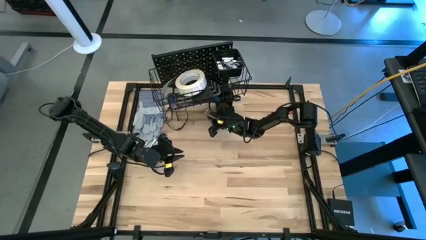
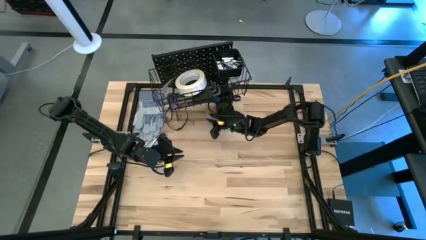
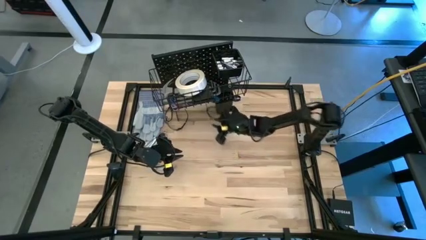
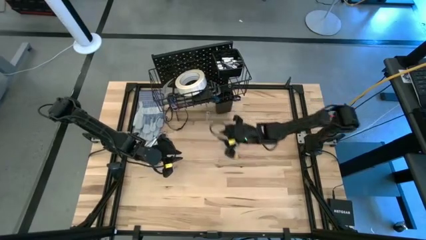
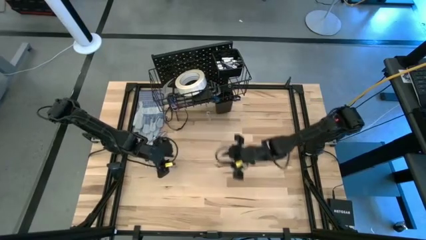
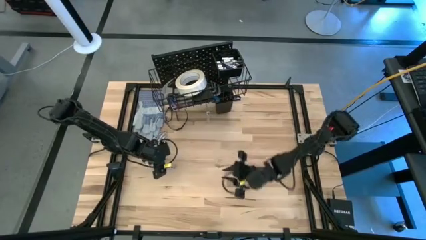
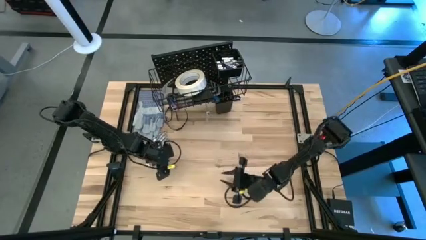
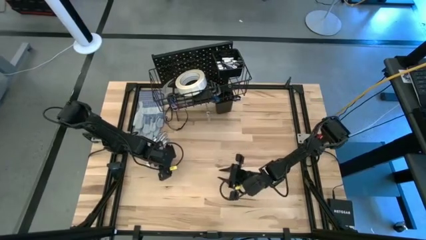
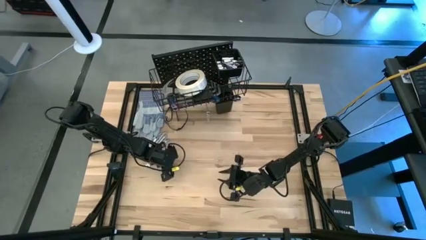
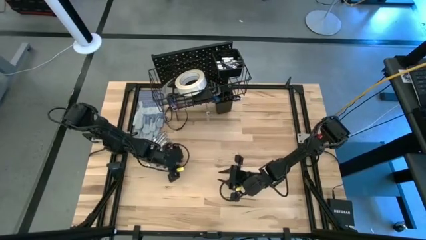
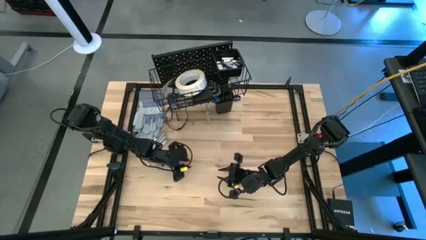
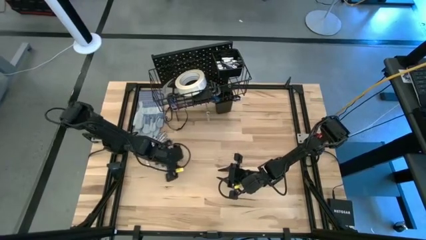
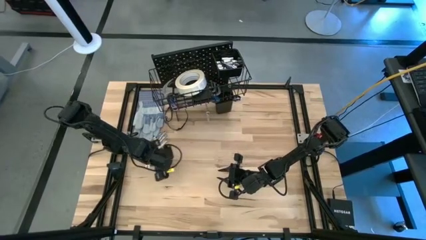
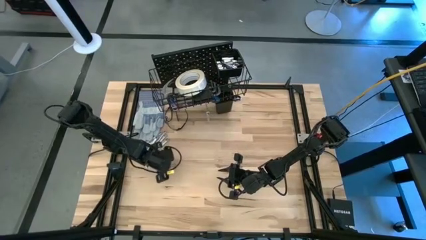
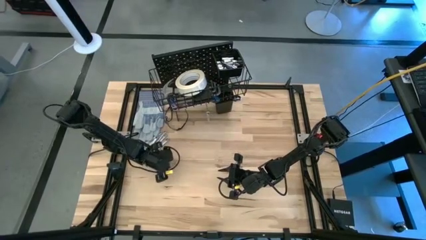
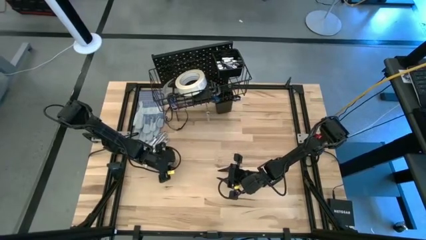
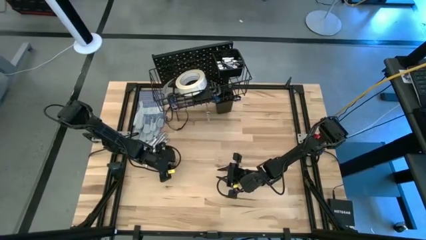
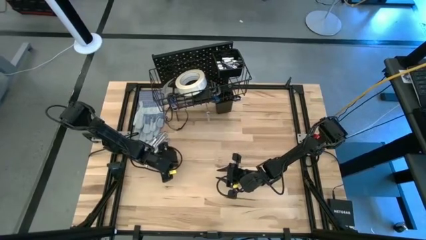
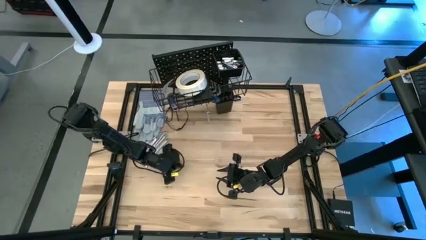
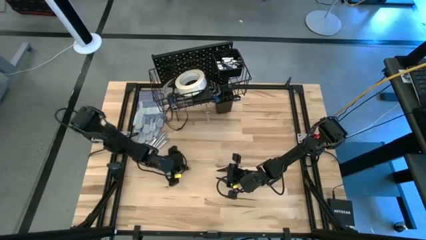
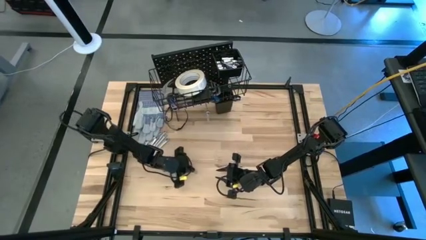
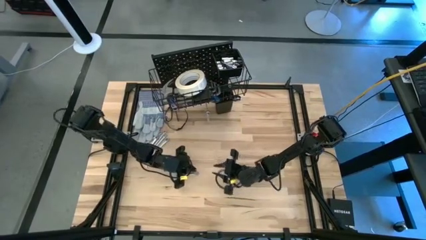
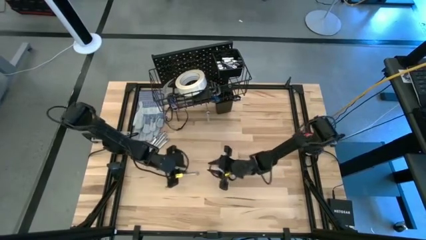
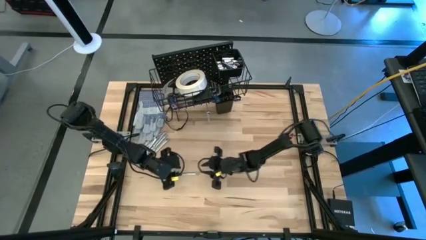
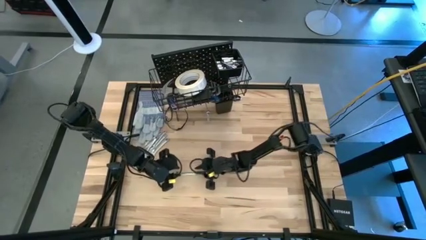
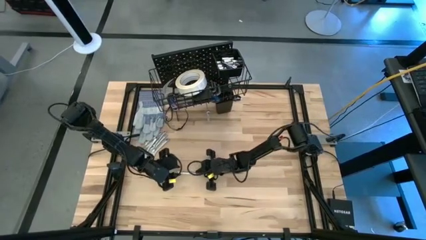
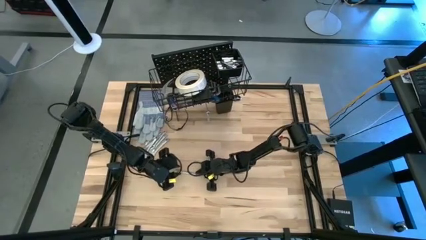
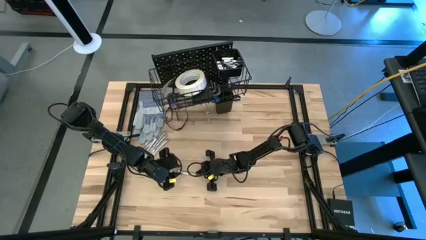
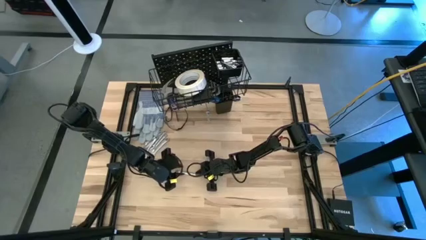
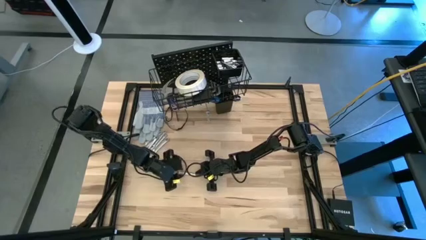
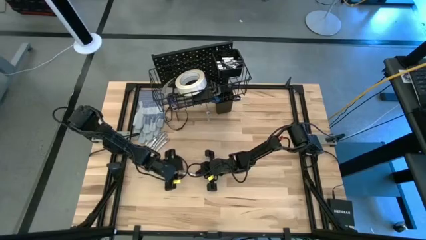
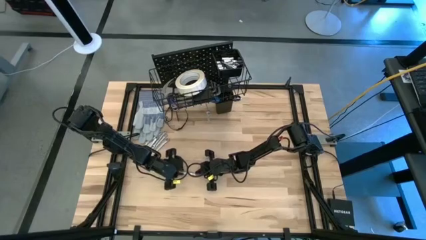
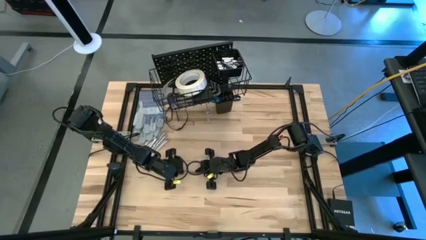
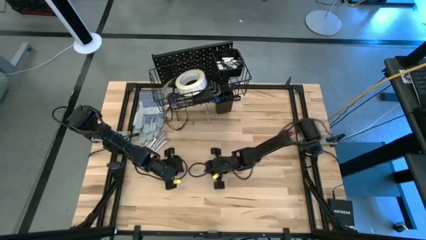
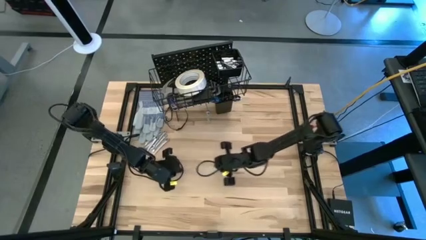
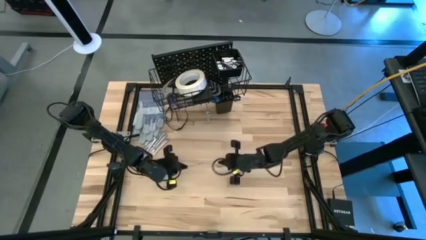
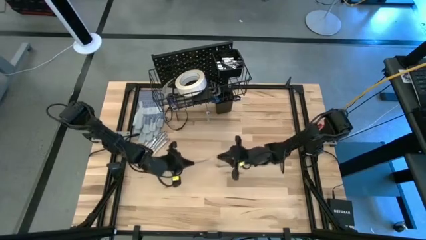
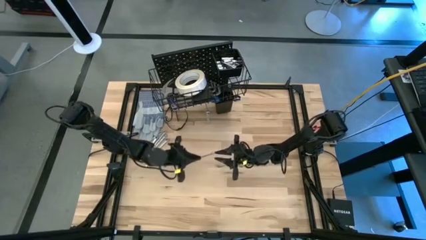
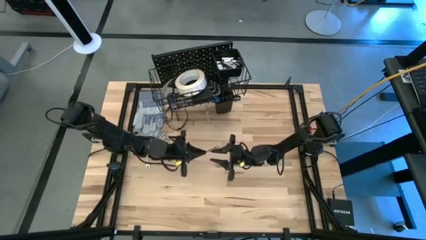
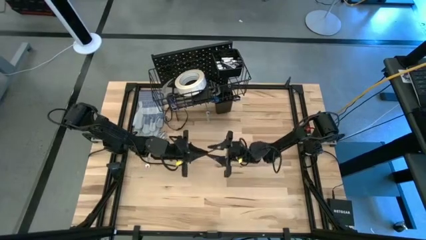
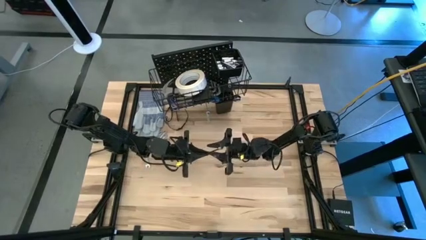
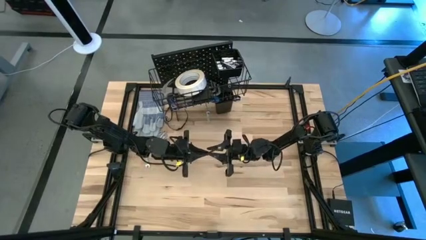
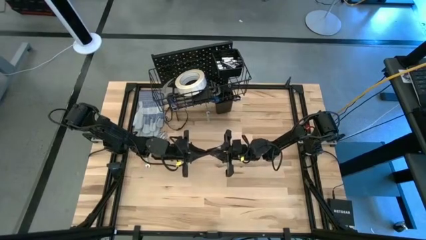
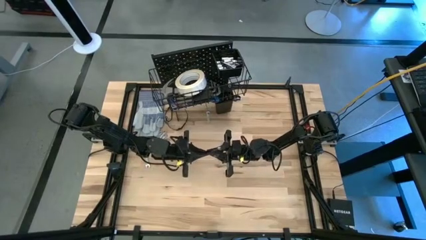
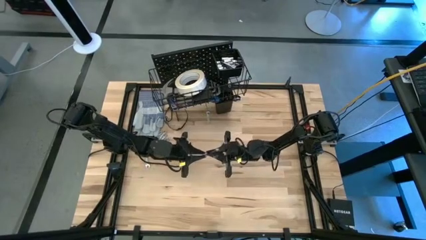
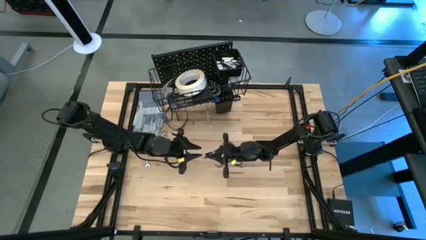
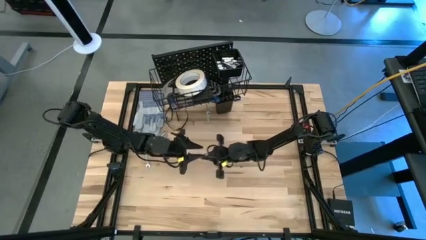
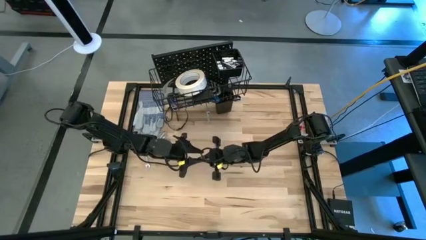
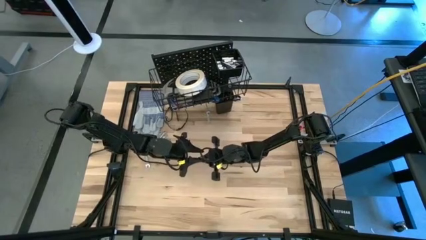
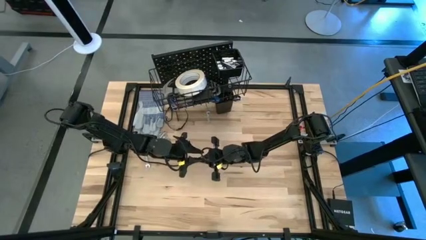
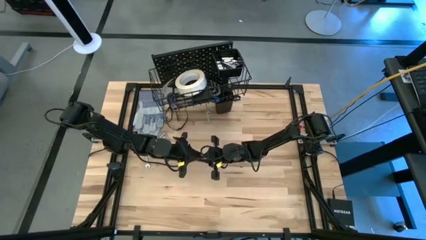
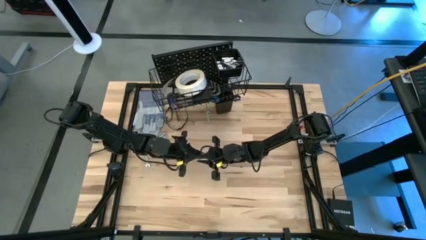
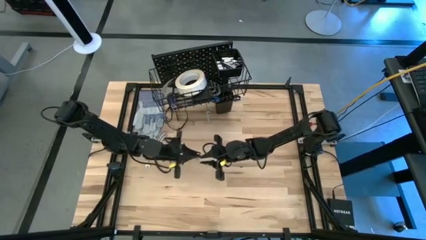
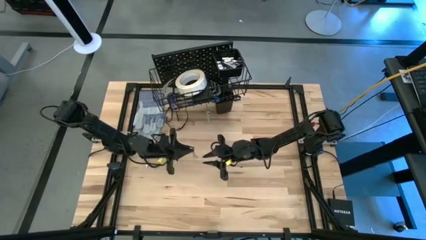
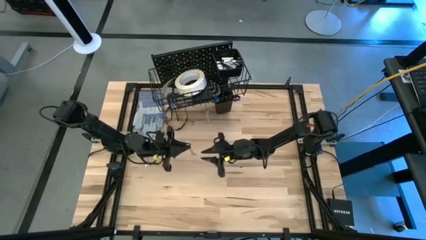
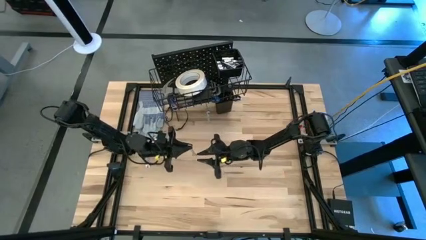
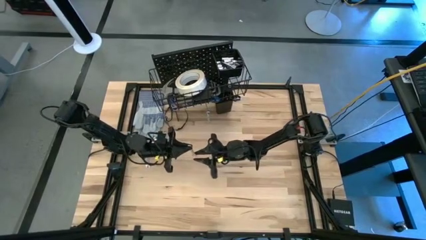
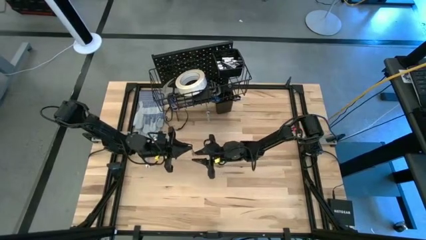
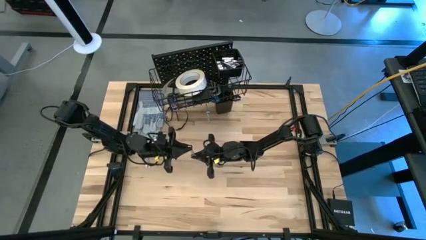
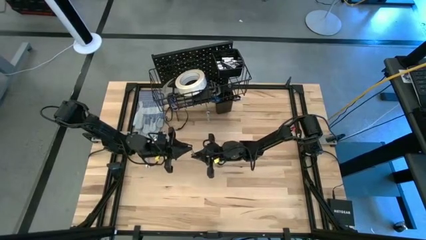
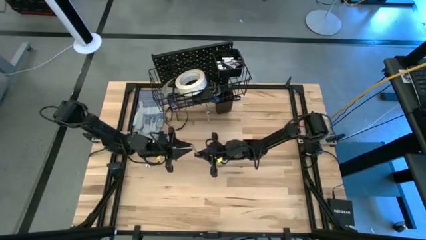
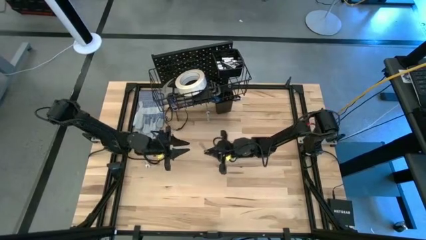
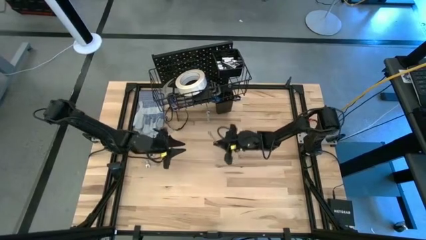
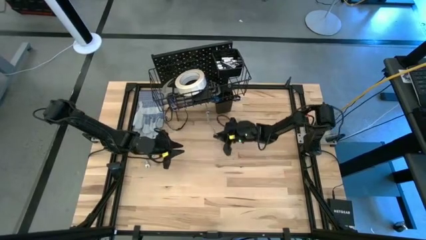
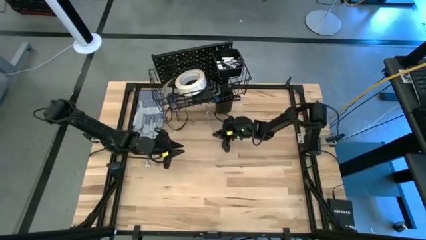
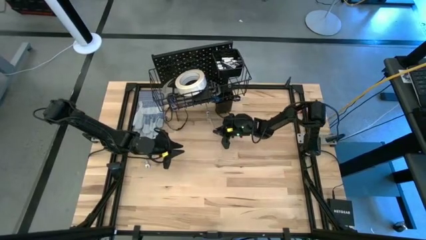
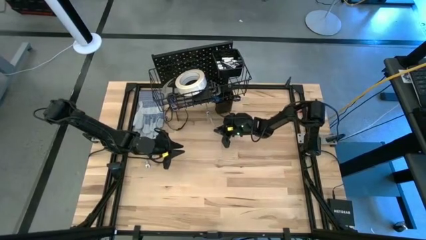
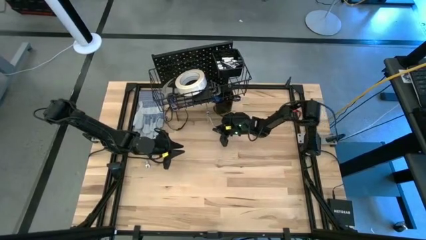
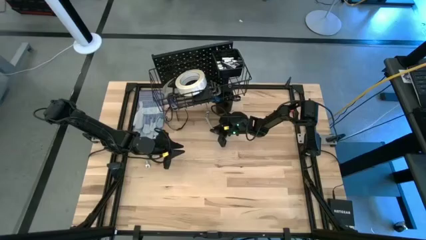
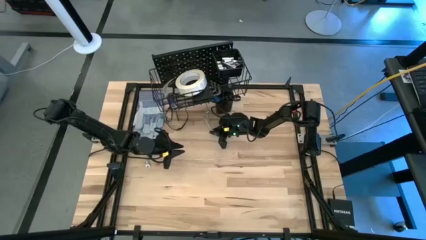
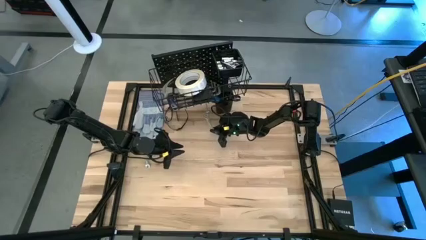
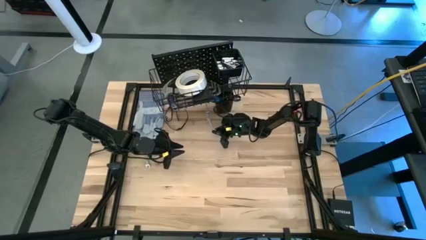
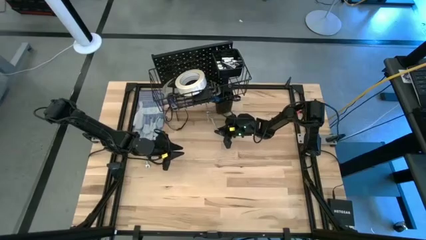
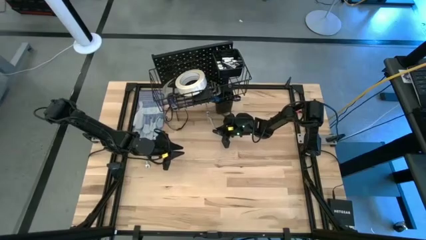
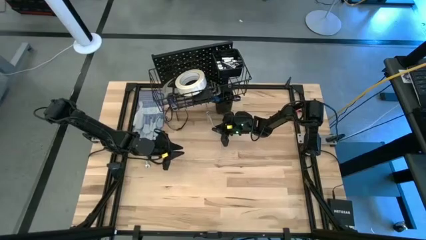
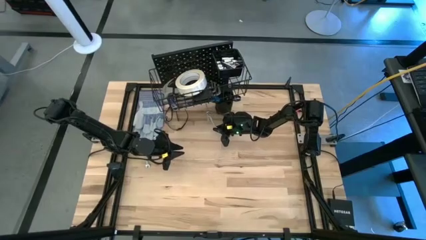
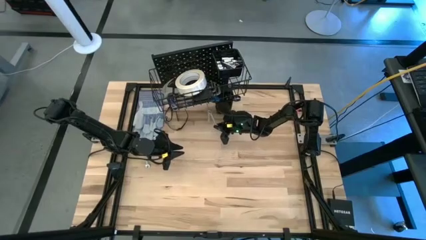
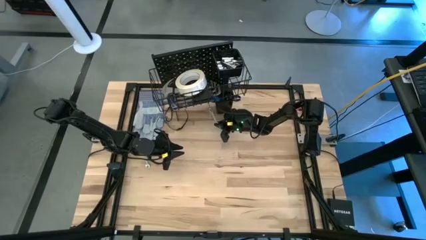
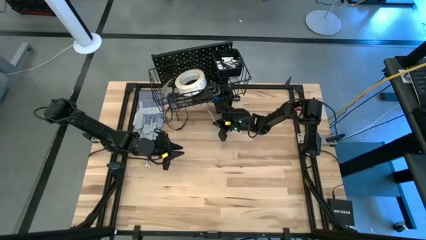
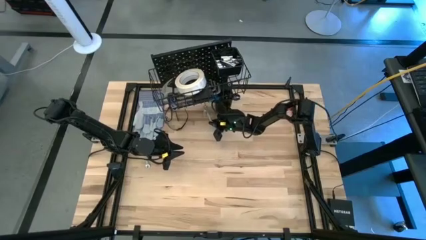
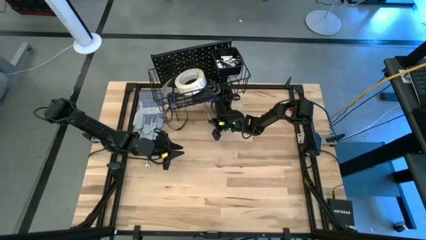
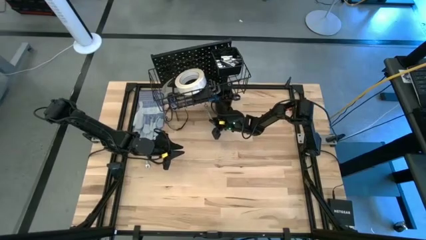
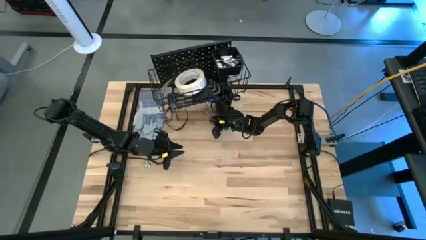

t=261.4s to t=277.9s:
Task: Hang tools onto peg board
Hang the wrench on the pegboard
